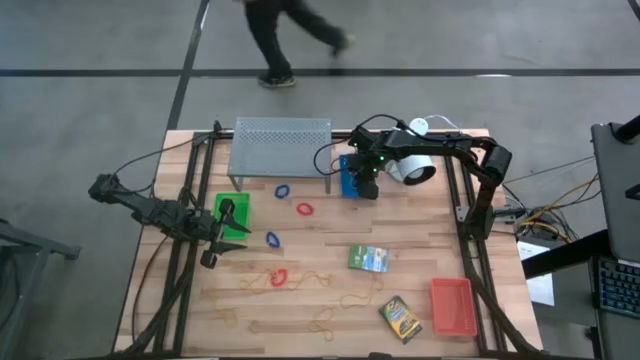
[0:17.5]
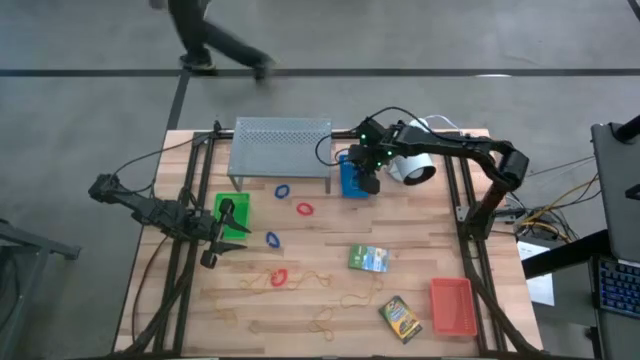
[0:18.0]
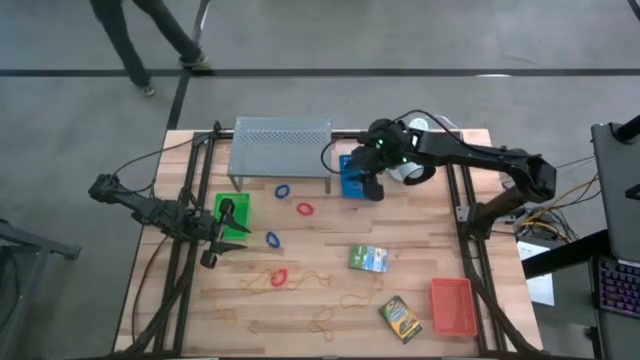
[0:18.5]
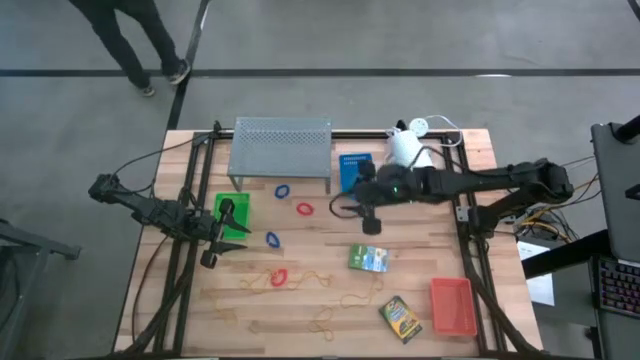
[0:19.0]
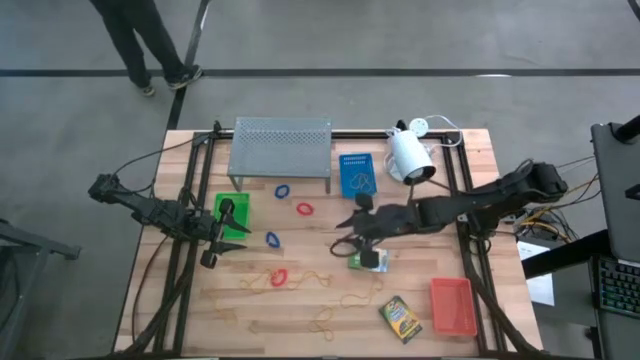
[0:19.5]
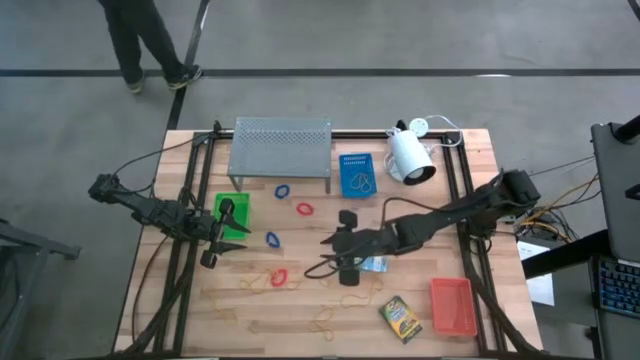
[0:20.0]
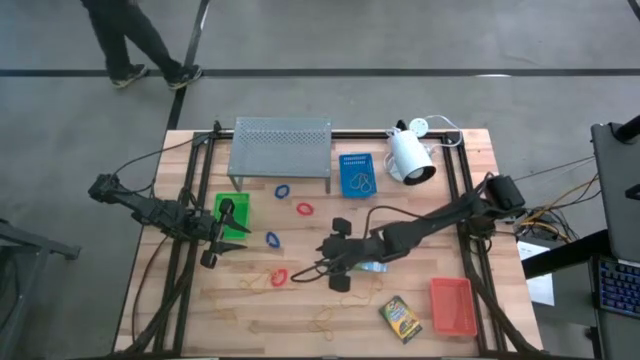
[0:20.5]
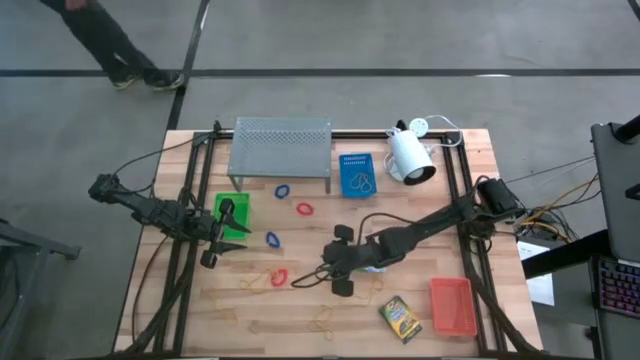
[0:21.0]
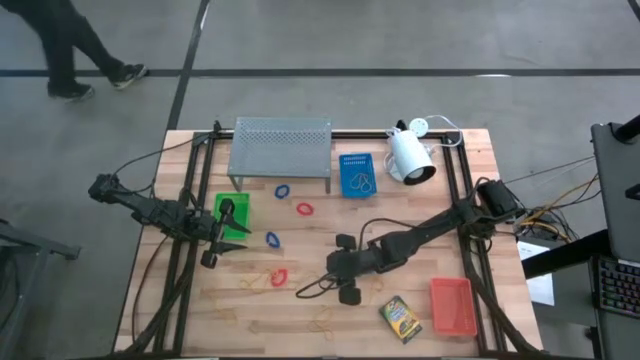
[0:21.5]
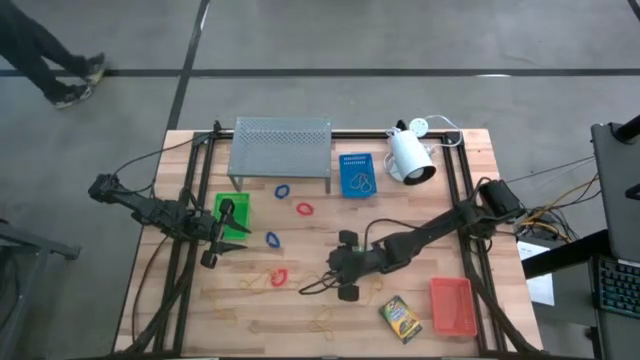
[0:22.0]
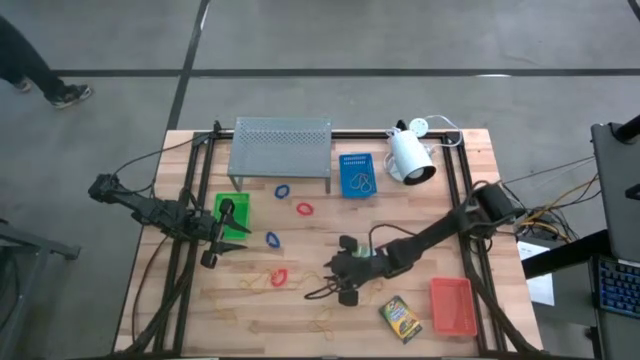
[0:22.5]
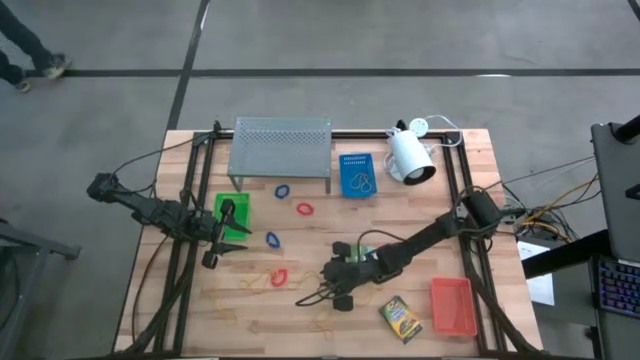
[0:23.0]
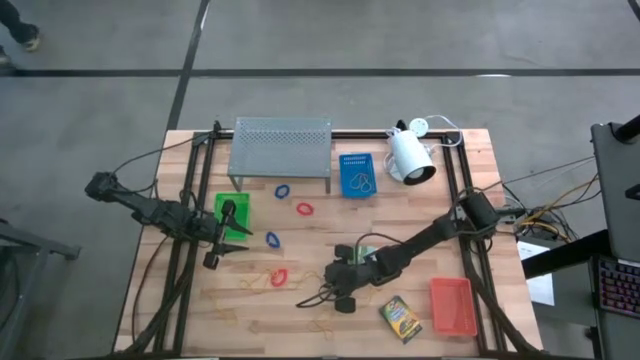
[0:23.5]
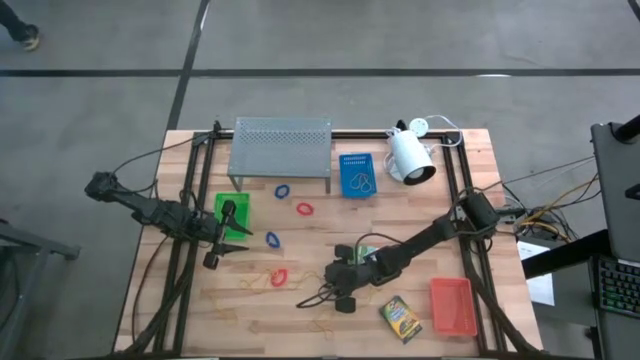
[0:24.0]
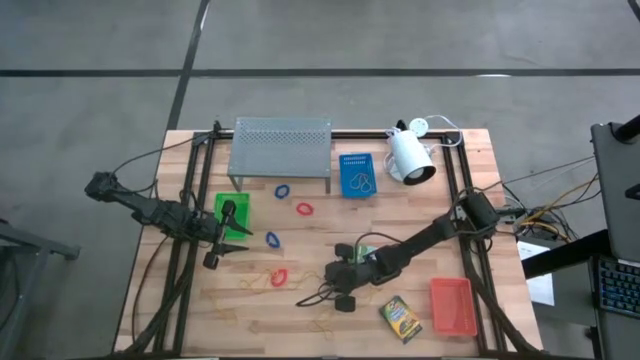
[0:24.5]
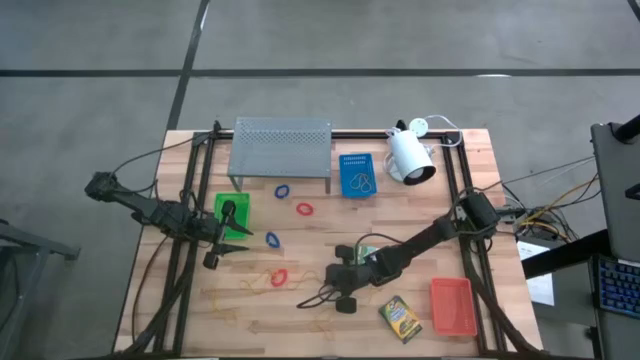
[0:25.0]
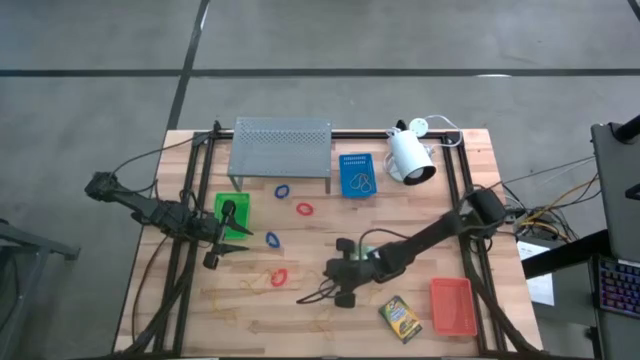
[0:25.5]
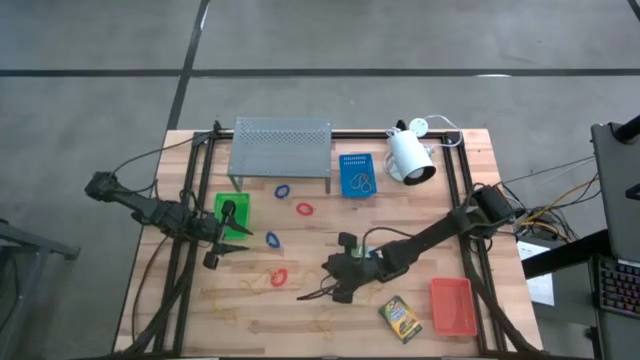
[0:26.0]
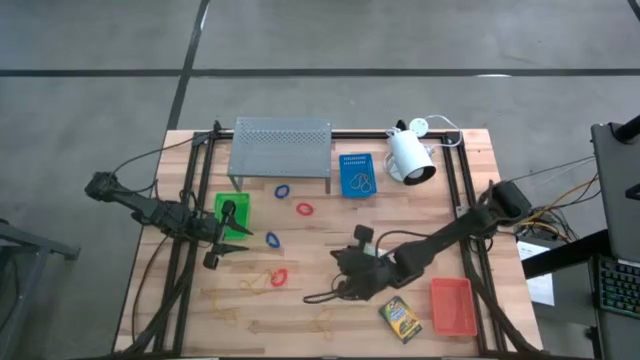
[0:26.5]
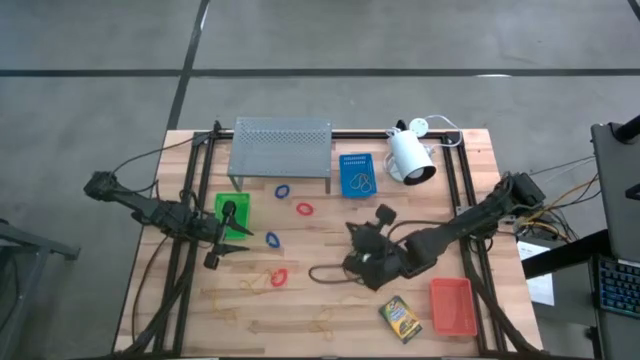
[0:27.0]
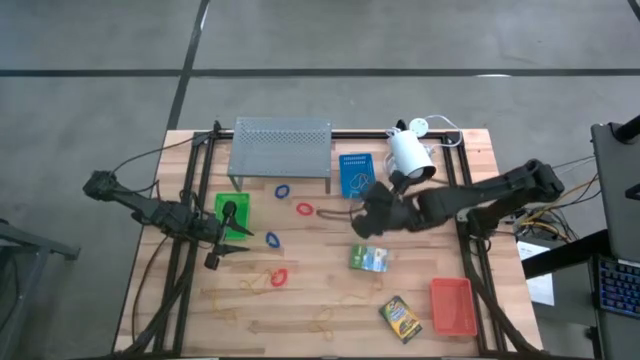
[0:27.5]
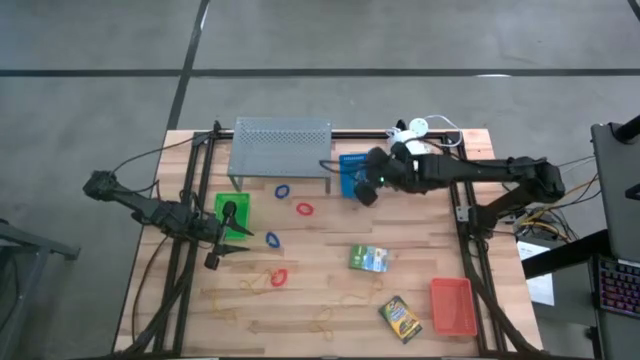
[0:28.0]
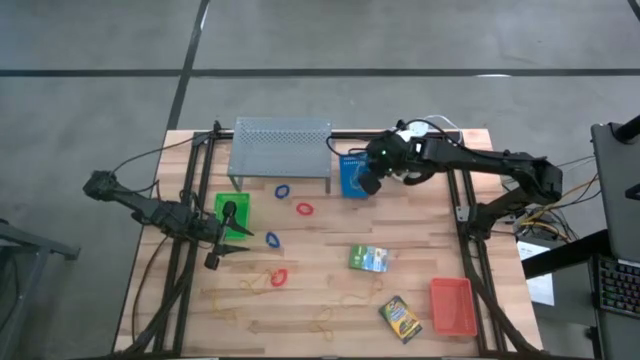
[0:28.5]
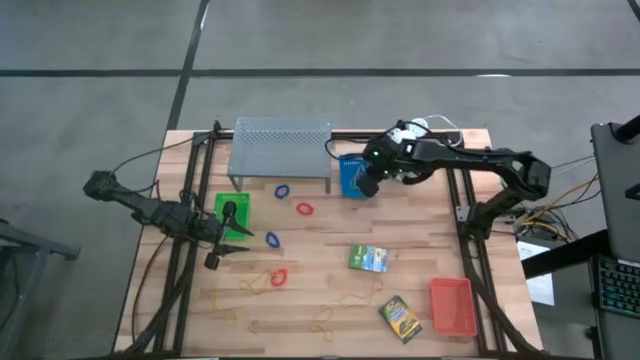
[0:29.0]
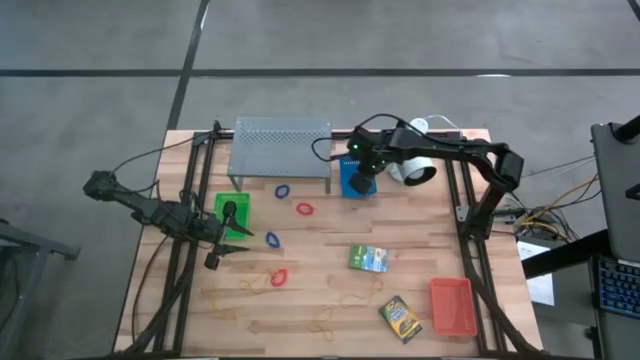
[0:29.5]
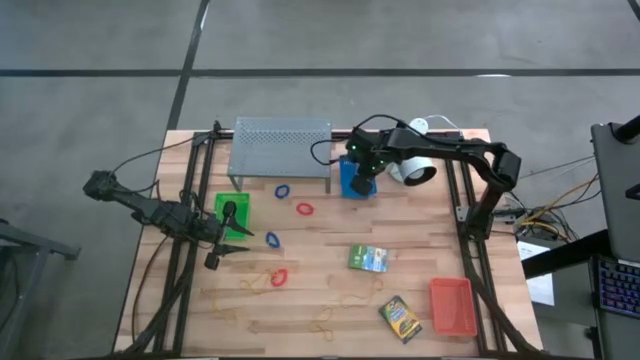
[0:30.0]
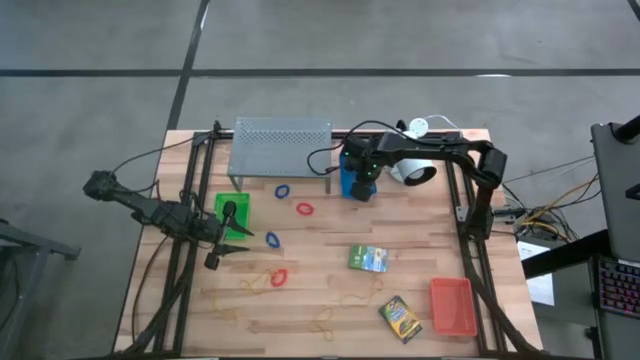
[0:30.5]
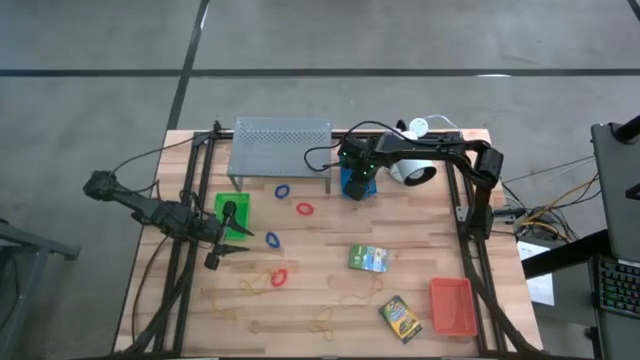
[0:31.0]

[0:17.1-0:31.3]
Task: Pick & Place Office Desk Supplies
Put the yellow rubber band into the blue bin

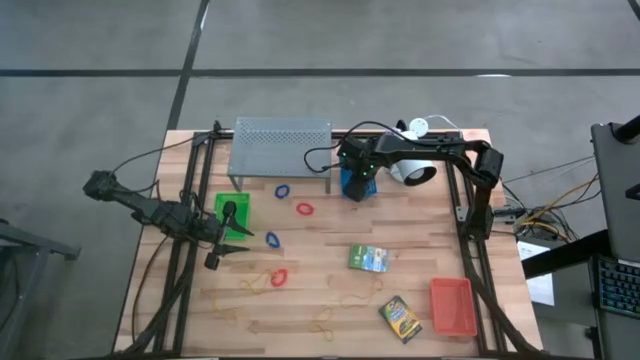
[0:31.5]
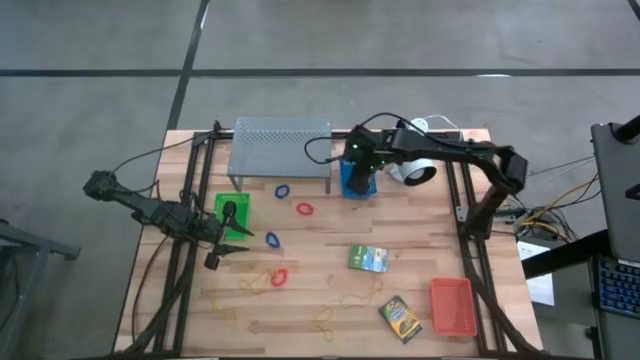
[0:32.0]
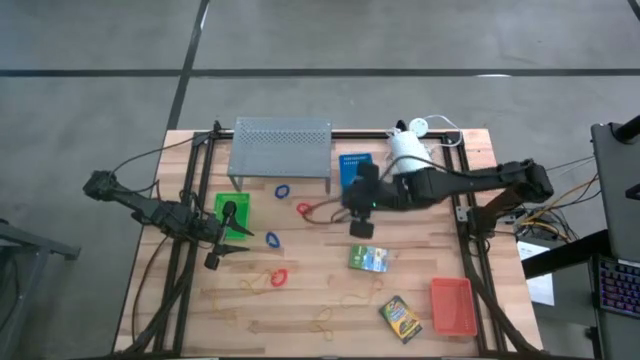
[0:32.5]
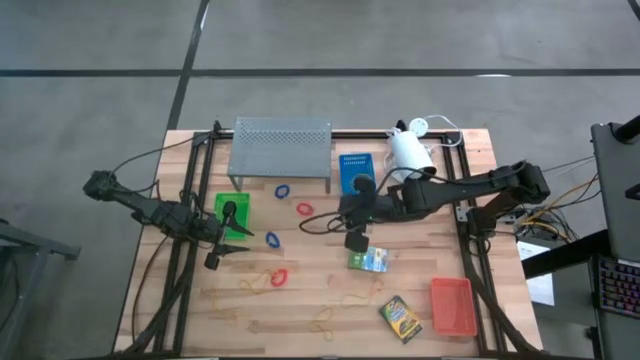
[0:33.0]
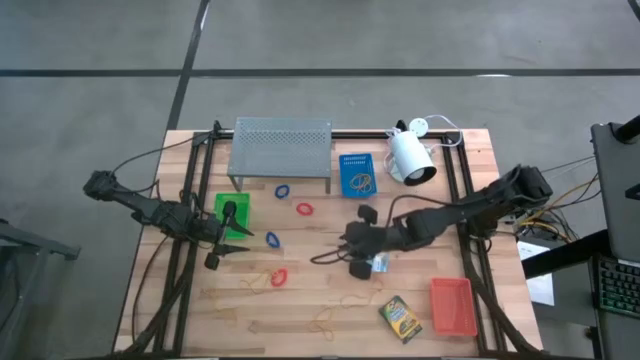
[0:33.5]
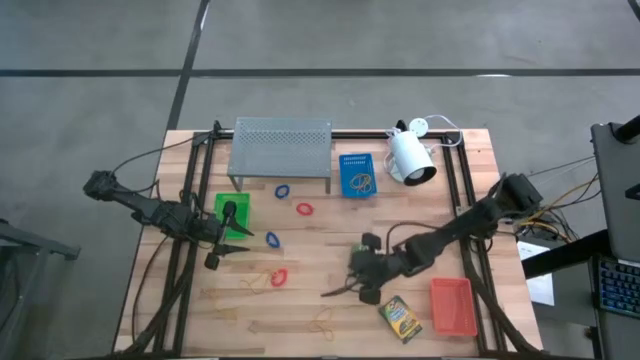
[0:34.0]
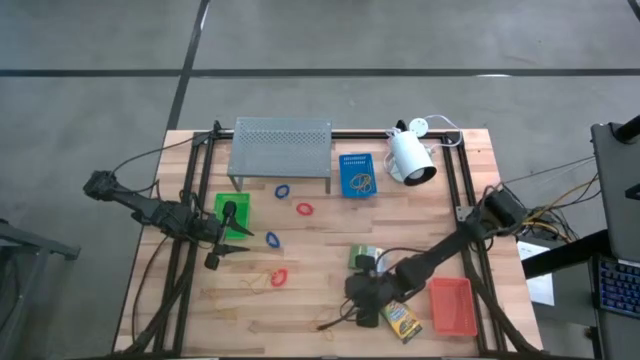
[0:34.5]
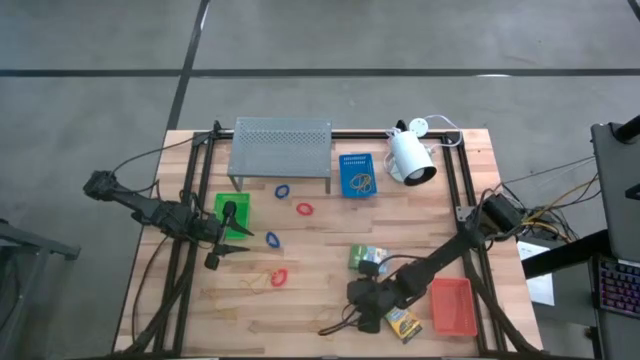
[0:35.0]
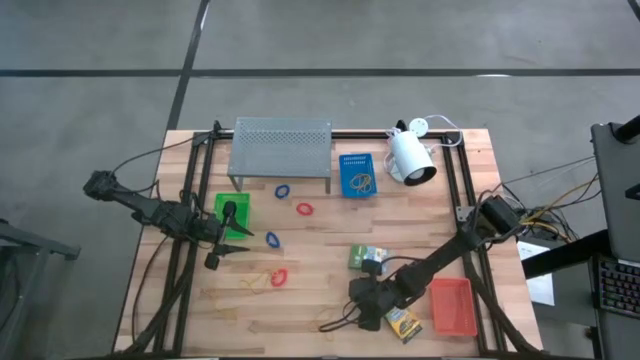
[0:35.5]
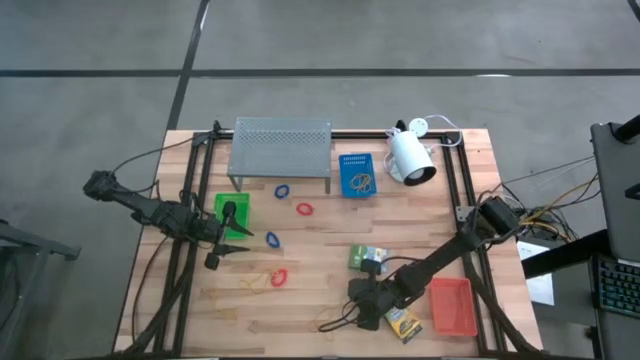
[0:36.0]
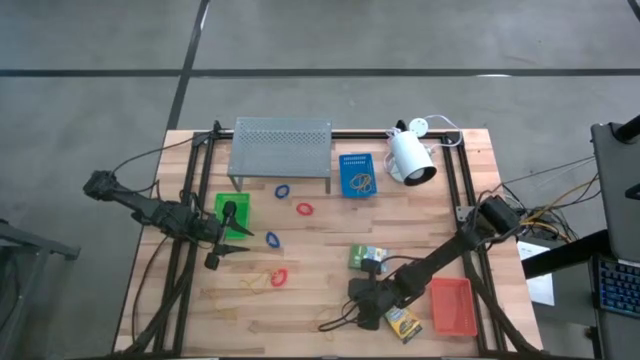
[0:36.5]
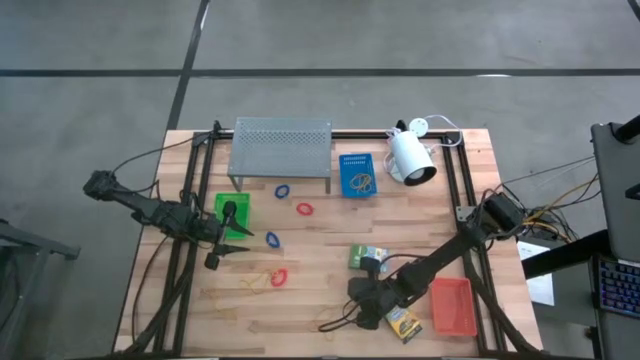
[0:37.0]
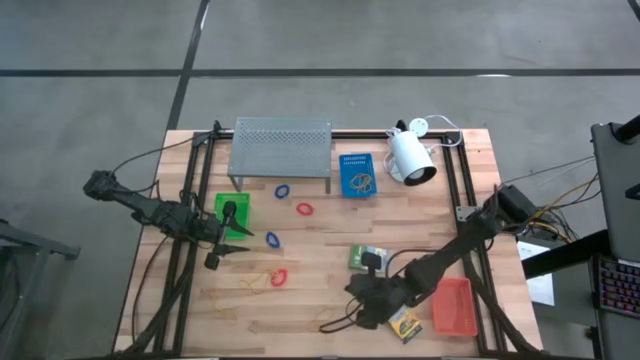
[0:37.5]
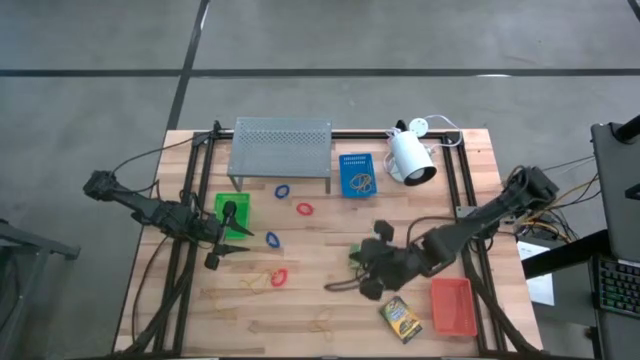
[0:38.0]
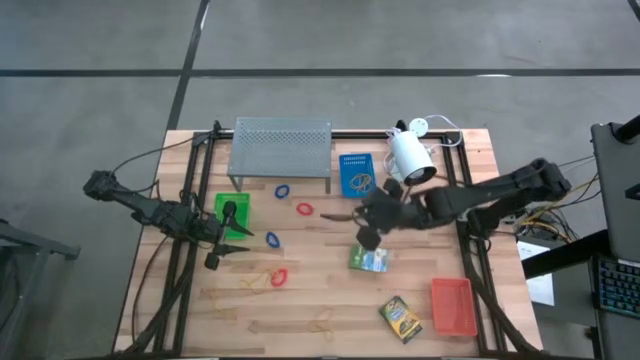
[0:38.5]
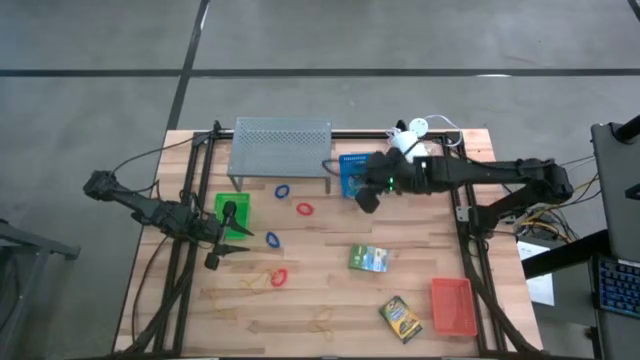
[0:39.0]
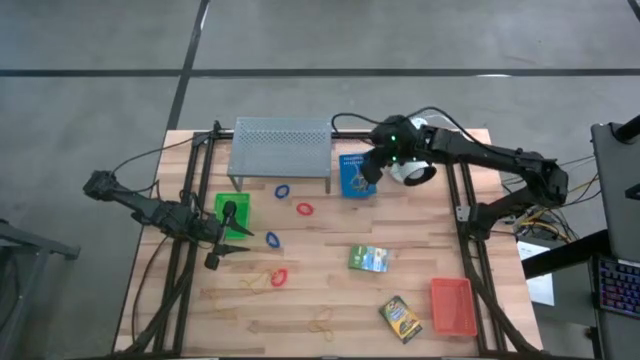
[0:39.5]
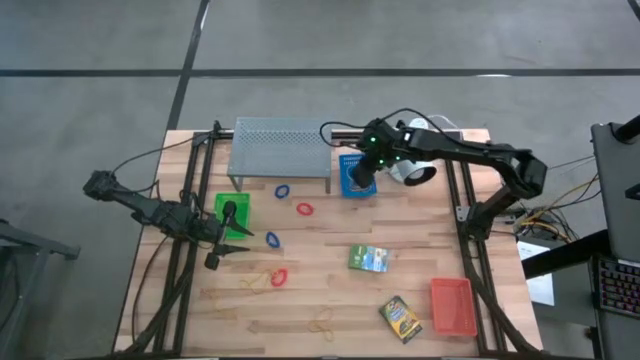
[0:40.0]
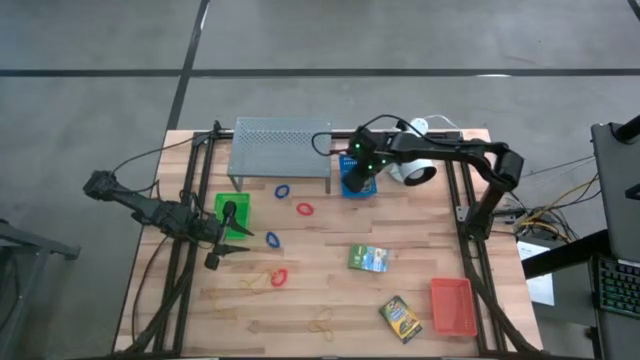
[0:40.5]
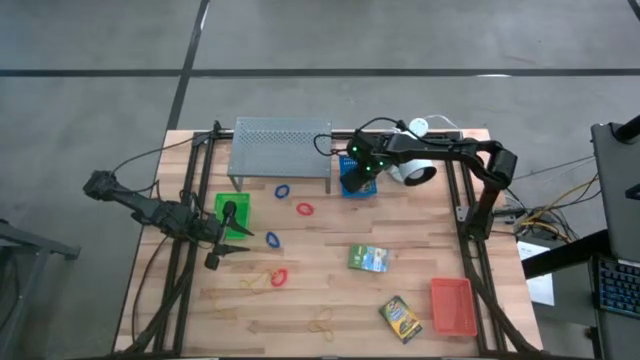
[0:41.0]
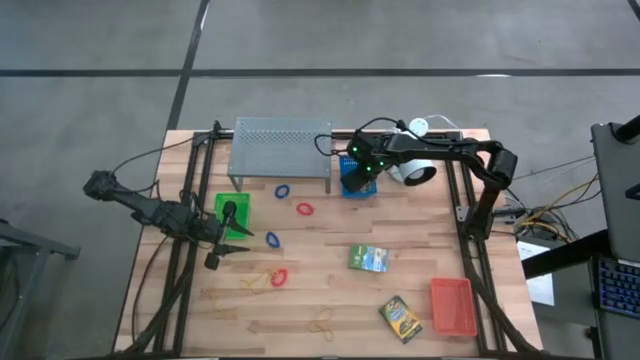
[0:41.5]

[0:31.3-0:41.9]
Put the yellow rubber band into the blue bin
